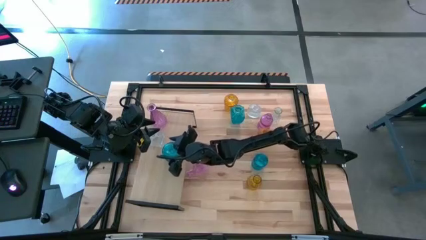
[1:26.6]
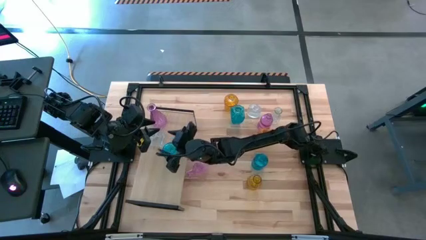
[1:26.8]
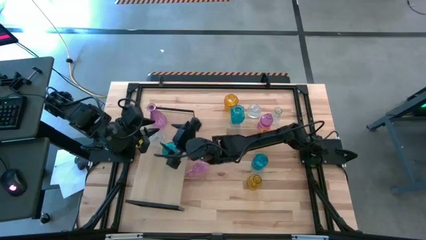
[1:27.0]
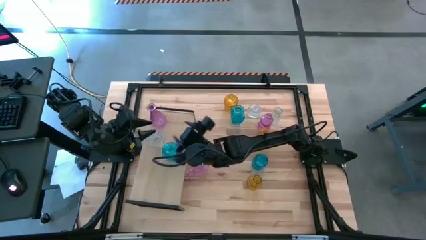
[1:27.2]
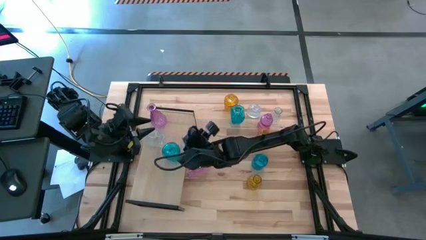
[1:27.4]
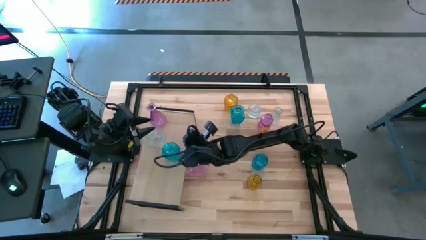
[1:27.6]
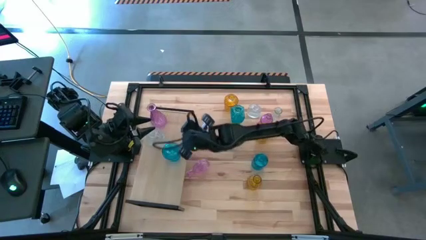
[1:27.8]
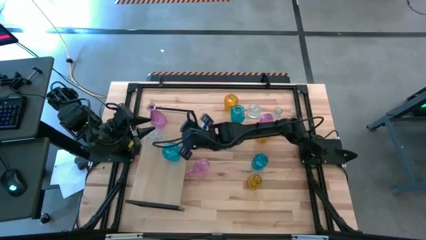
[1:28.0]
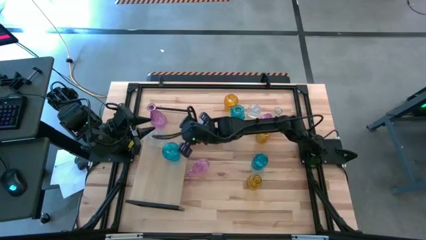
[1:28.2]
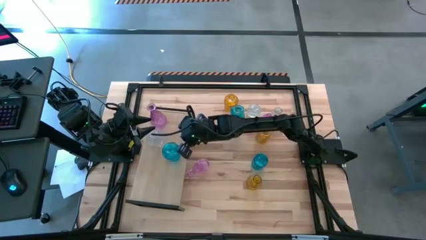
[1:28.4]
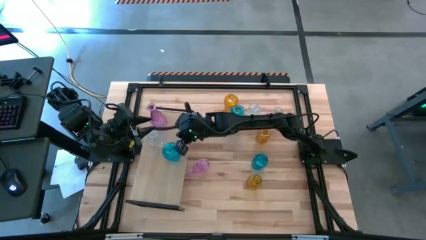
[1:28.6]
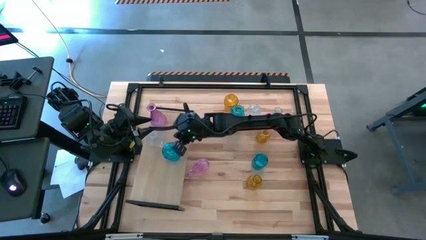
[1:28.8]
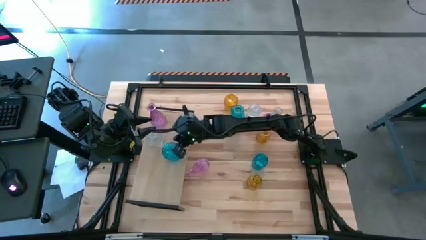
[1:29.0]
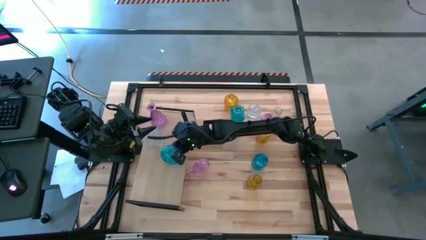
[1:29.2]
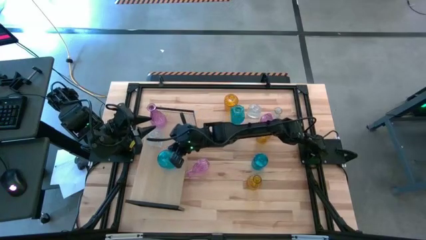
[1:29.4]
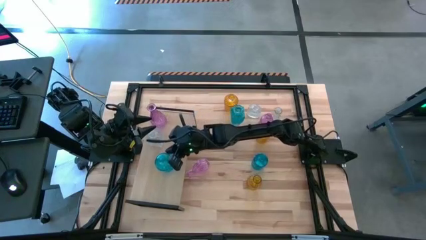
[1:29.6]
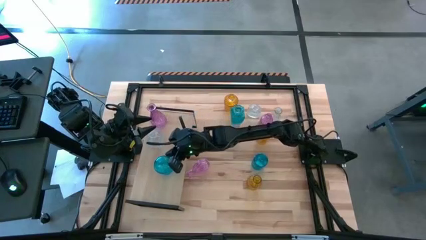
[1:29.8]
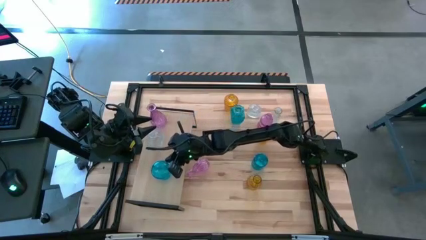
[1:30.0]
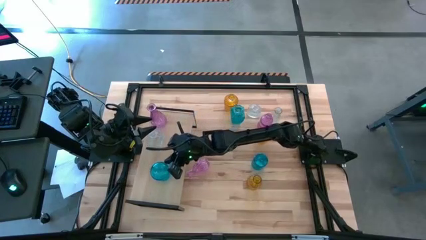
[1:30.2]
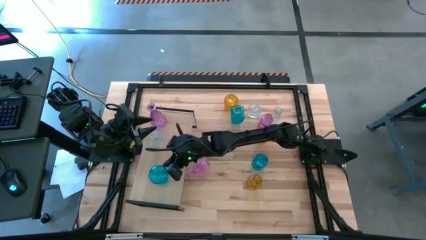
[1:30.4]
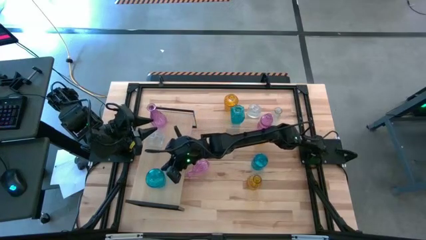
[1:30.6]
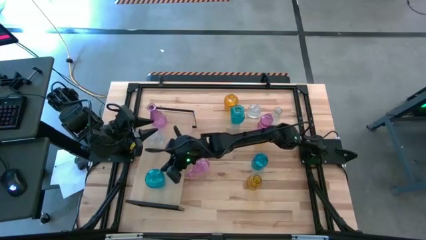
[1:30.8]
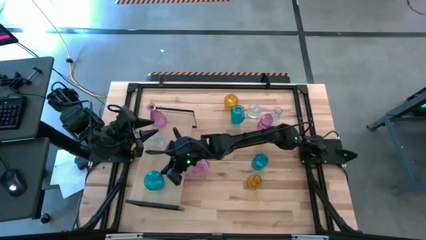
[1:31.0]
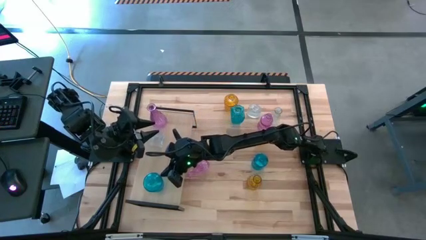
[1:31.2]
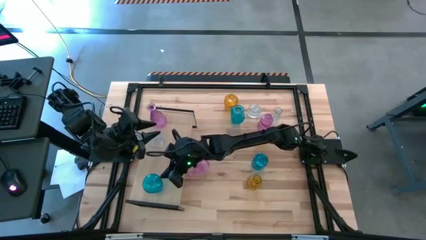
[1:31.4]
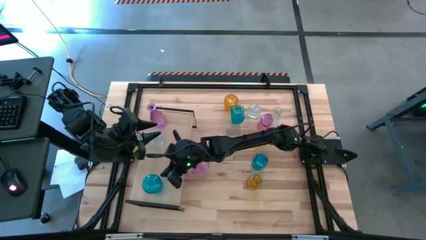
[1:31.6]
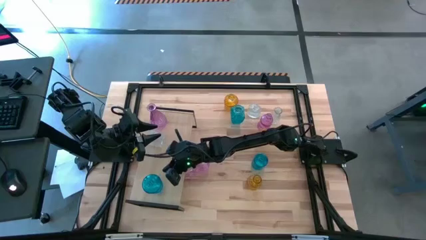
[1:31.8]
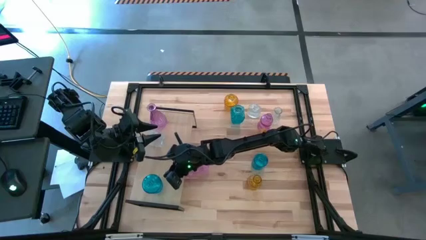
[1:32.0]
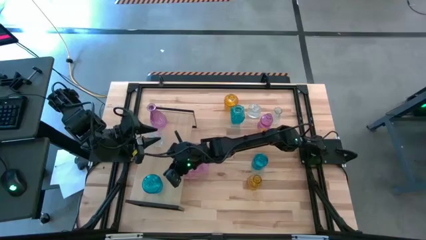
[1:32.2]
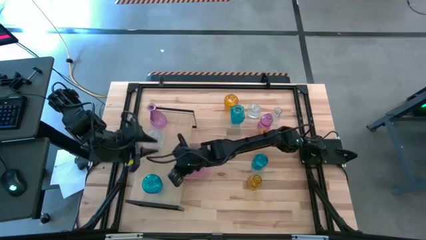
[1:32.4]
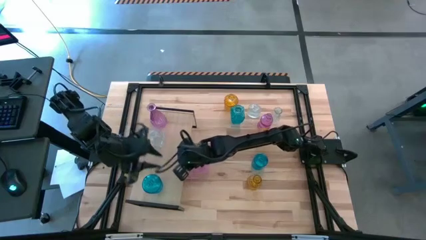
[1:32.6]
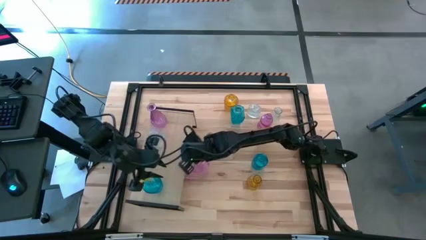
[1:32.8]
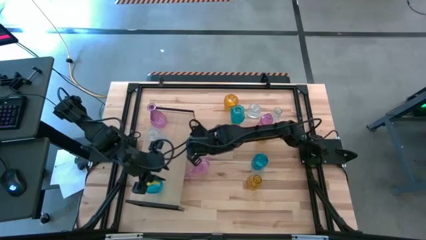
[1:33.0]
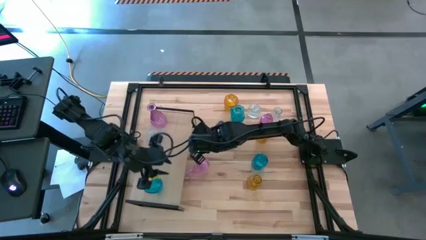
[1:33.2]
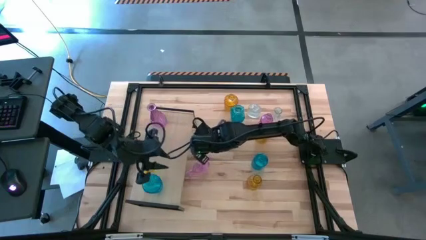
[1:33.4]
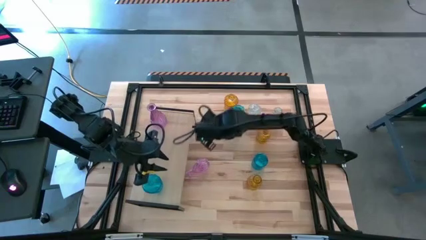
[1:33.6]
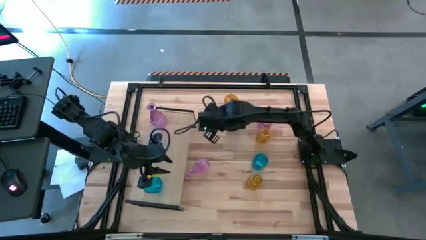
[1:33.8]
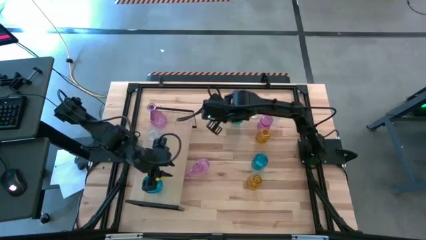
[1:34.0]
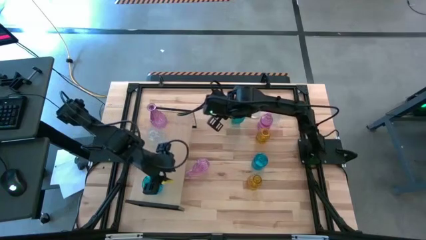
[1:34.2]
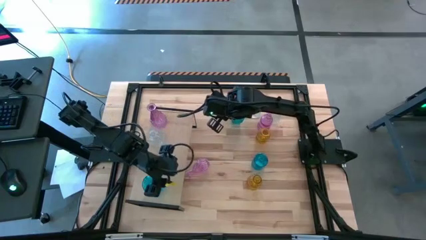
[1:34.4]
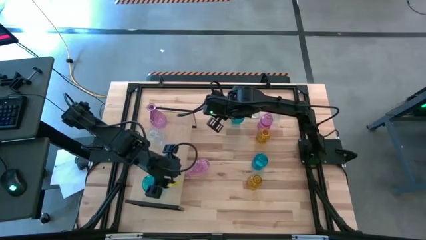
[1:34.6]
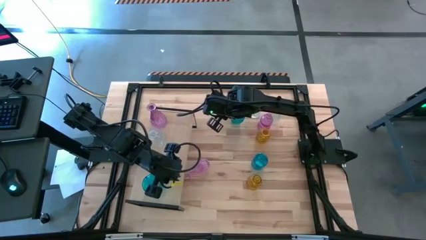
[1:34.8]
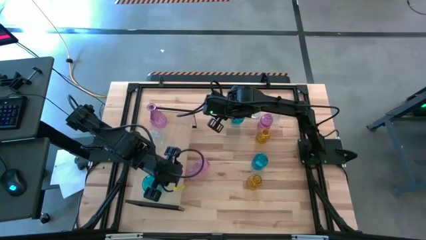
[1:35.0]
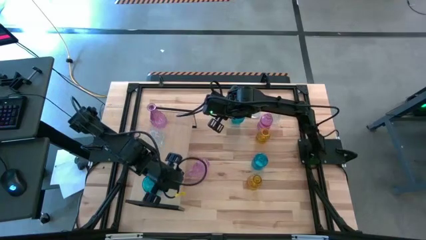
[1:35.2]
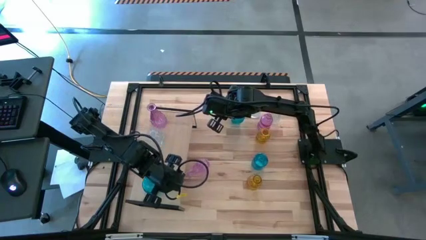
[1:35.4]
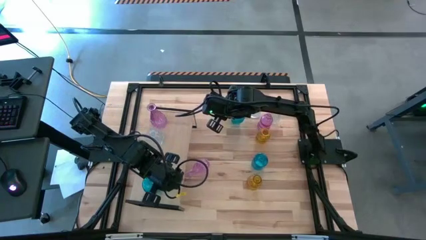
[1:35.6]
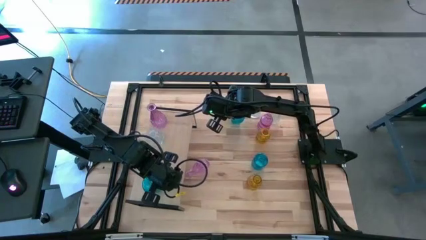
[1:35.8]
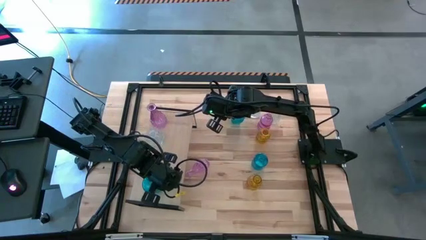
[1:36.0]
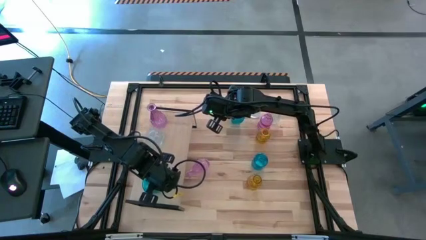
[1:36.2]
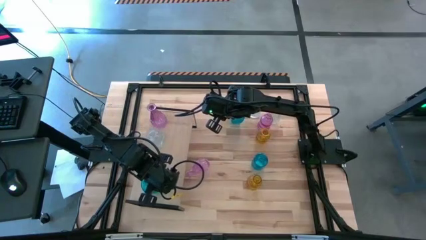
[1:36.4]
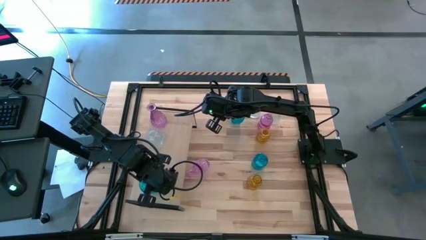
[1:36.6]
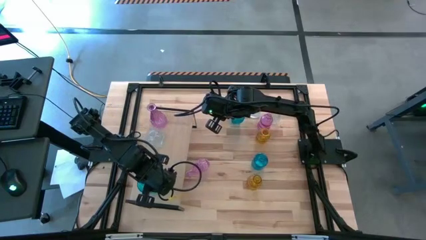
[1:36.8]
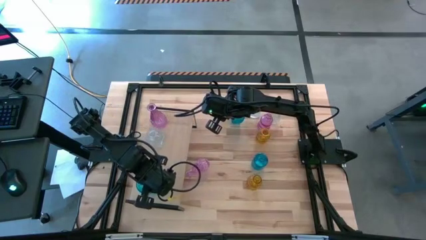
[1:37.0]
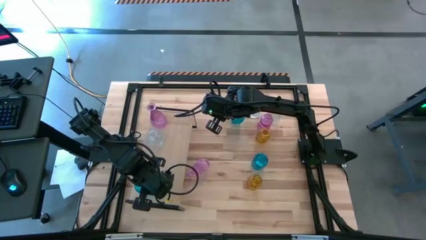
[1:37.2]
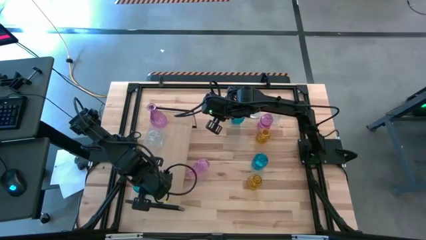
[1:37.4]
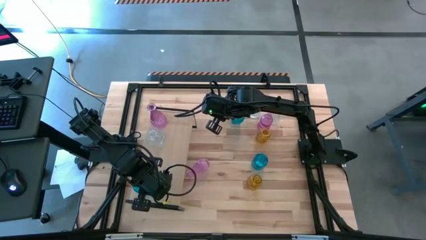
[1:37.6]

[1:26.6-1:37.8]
Task: sort vases onto shelf
Put the bottom left blue flower vase on the shelf

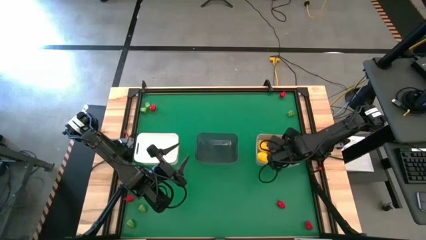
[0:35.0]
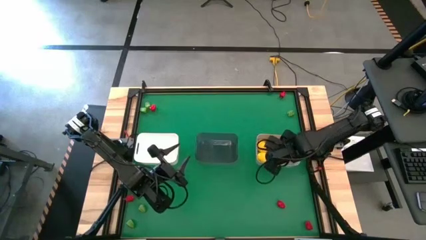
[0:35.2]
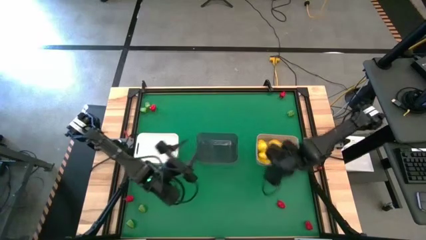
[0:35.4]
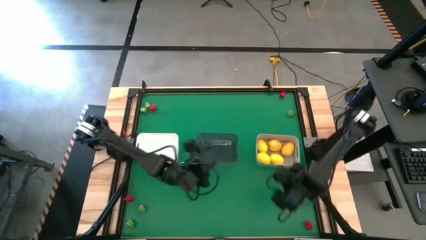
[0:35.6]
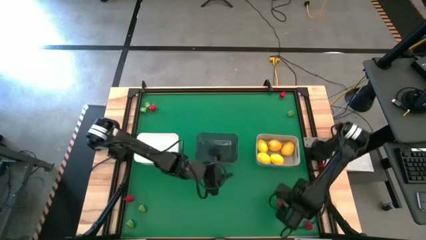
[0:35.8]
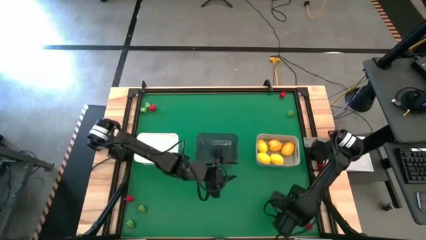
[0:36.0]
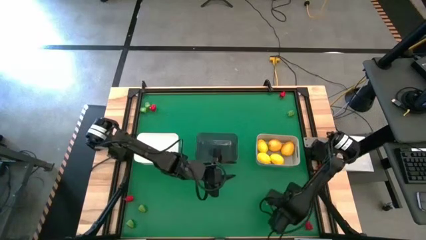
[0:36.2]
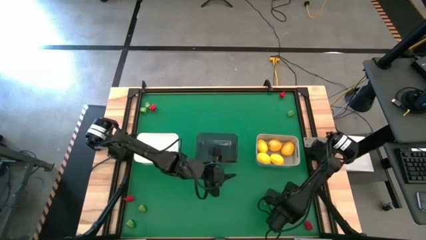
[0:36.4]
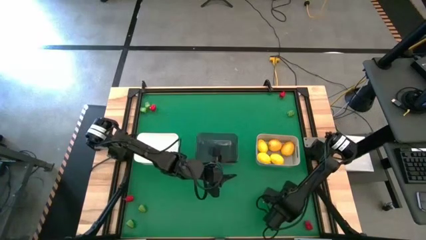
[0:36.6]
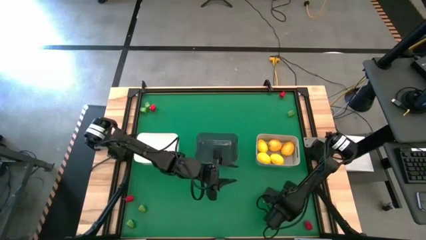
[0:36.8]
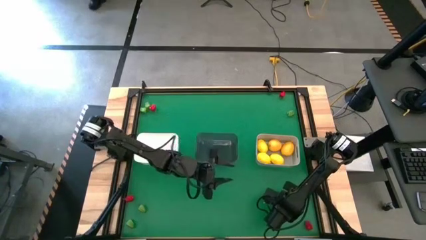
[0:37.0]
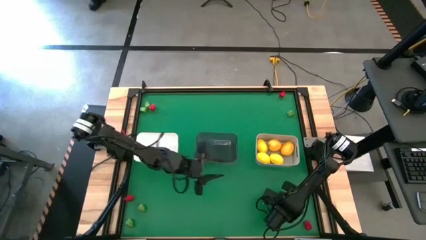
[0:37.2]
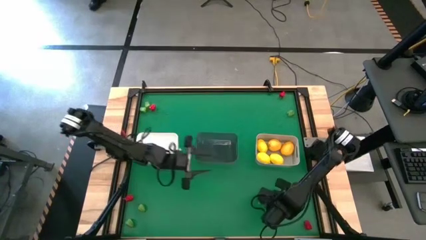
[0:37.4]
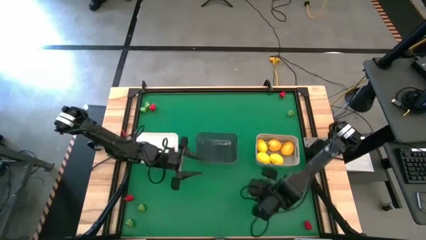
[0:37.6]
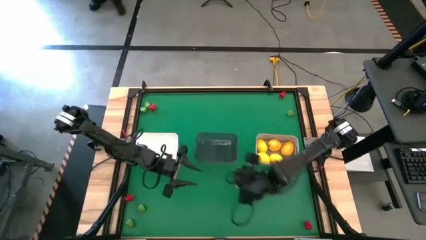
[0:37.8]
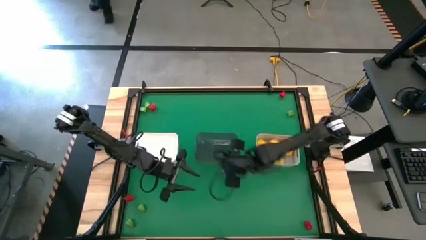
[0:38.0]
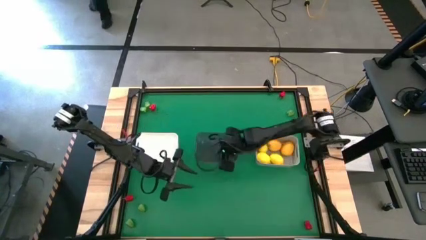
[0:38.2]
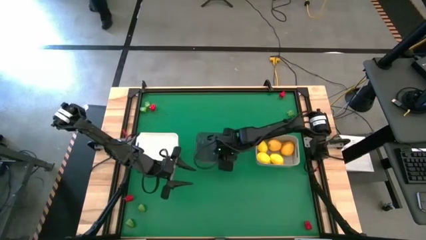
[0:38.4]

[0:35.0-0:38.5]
Task: Sort produce into baskets
Put the red chili pepper into the black bin

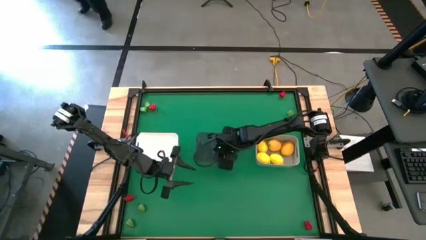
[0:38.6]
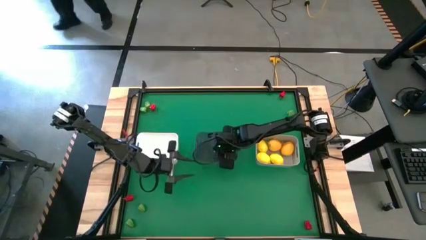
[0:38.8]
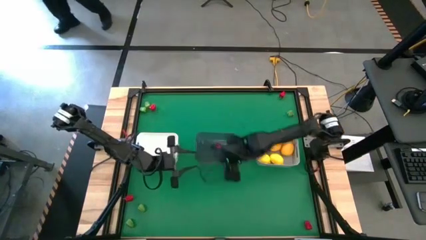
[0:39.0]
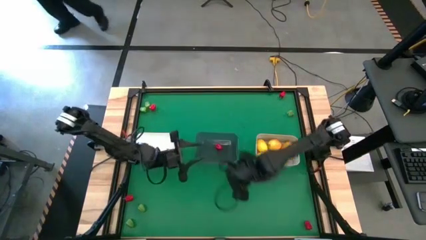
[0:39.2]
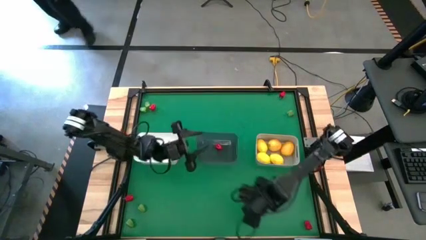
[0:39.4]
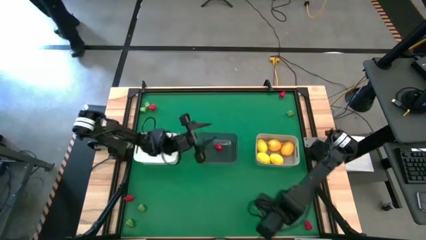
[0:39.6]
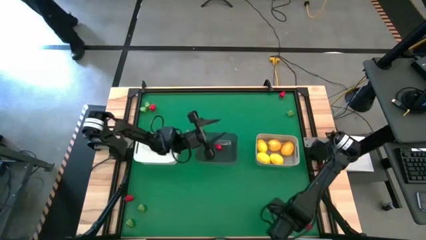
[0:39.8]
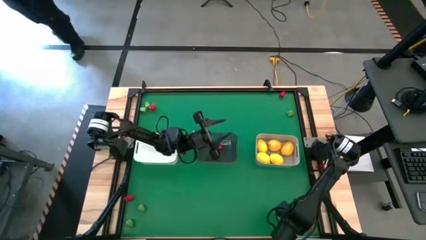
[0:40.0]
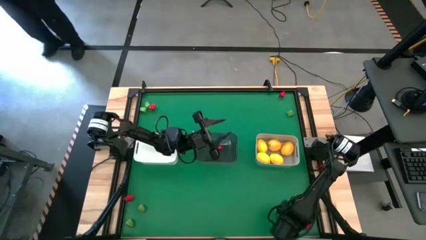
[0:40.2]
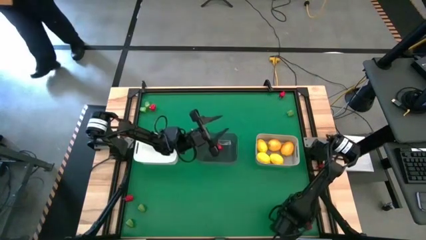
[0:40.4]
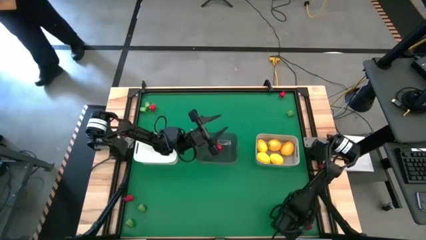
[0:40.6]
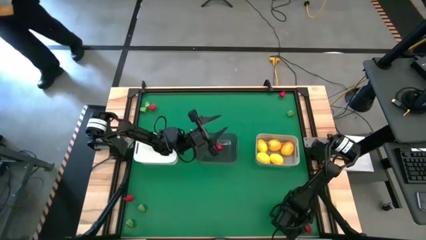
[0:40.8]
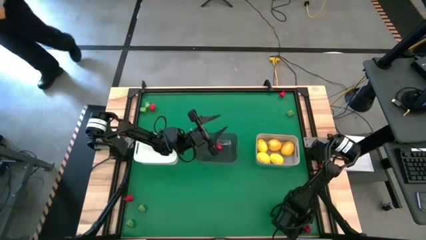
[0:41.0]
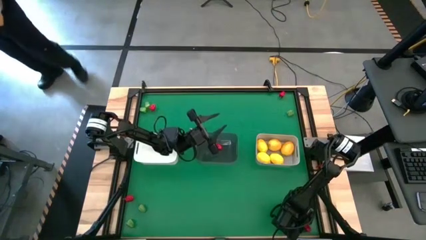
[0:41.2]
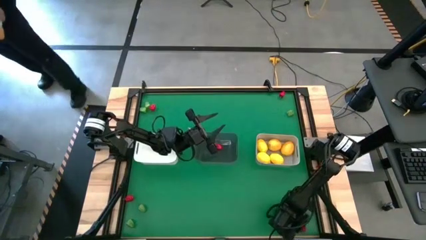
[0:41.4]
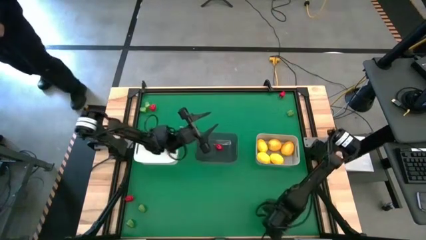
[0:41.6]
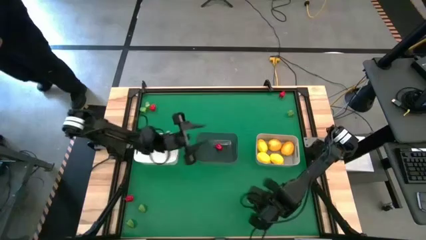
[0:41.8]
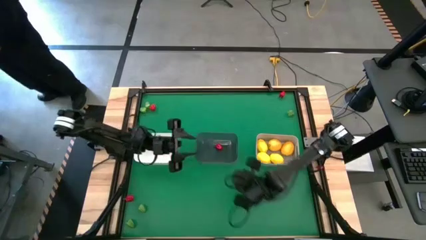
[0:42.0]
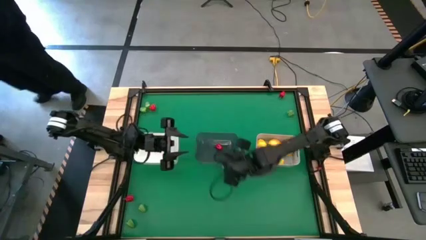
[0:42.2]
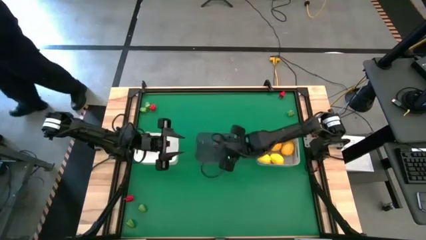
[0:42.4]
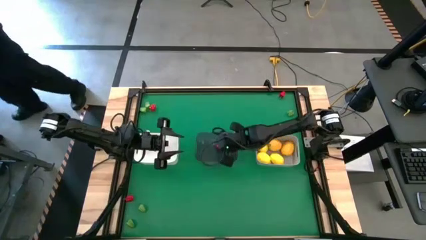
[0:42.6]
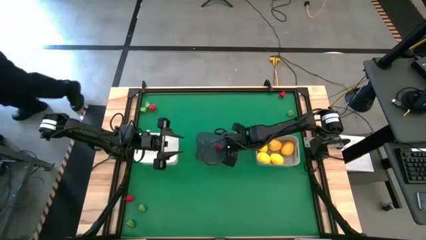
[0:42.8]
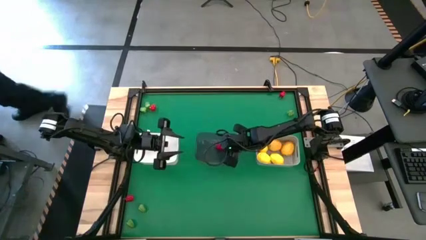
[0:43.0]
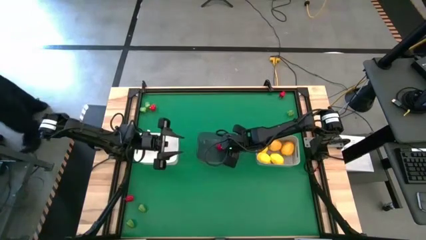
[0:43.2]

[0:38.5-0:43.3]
Put the red chili pepper into the black bin
